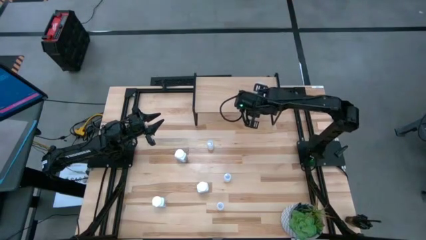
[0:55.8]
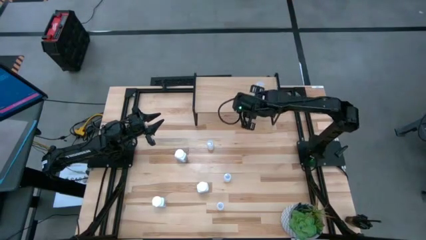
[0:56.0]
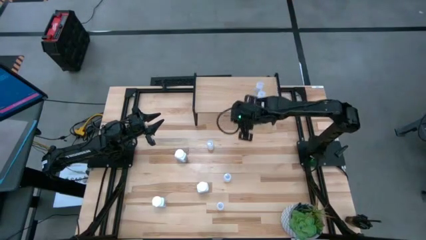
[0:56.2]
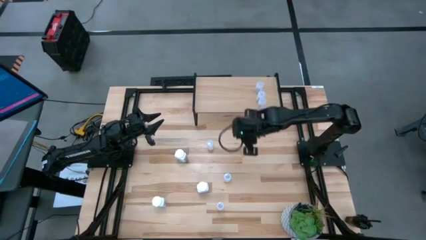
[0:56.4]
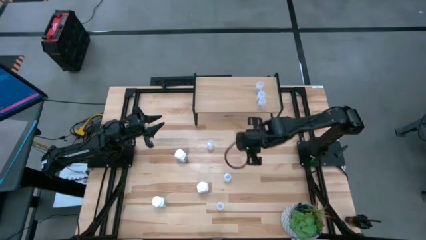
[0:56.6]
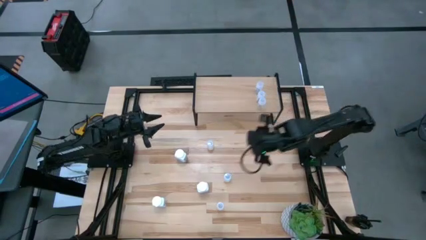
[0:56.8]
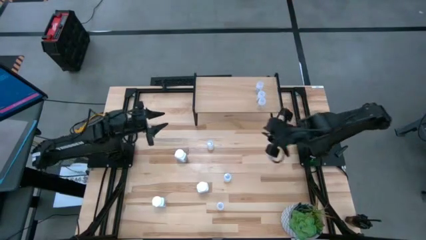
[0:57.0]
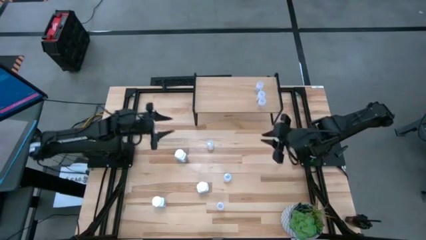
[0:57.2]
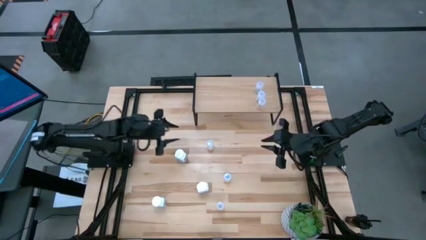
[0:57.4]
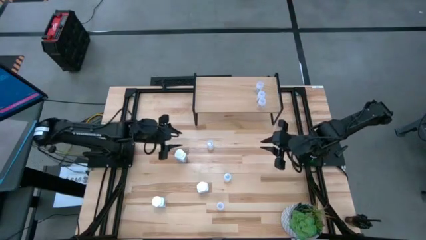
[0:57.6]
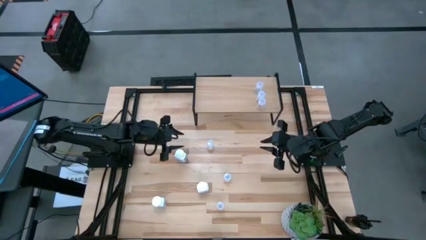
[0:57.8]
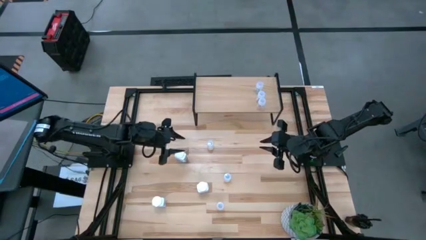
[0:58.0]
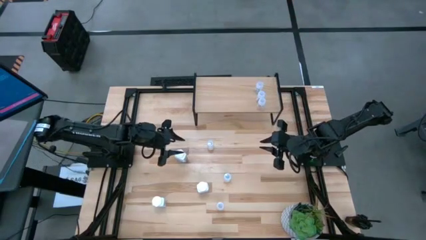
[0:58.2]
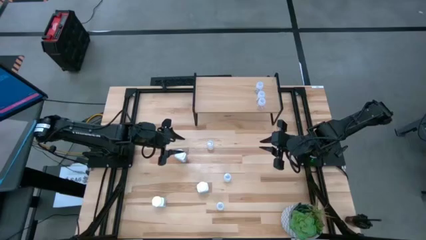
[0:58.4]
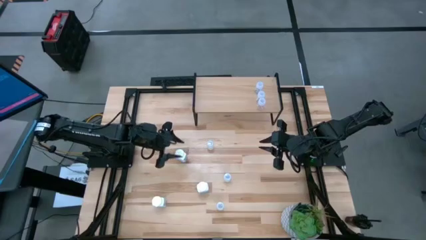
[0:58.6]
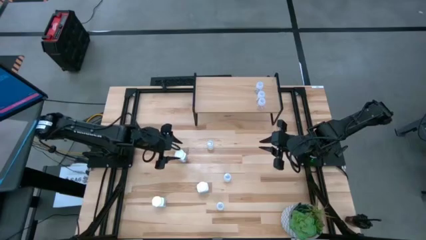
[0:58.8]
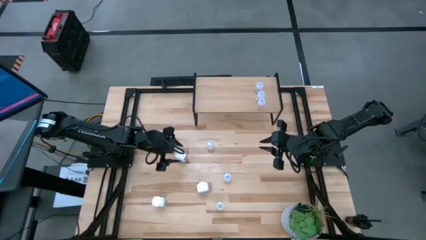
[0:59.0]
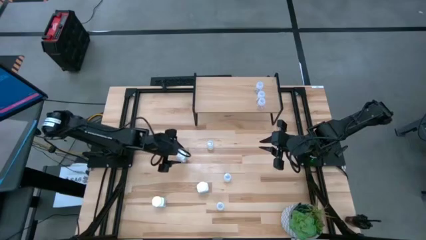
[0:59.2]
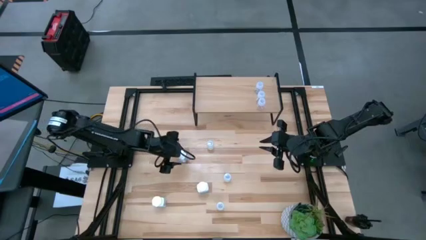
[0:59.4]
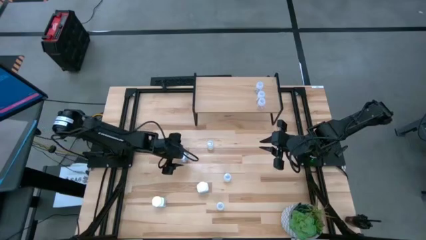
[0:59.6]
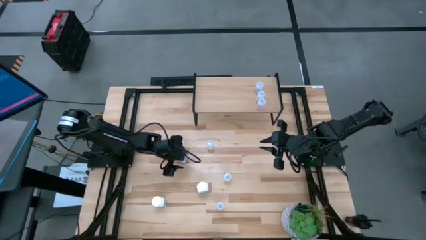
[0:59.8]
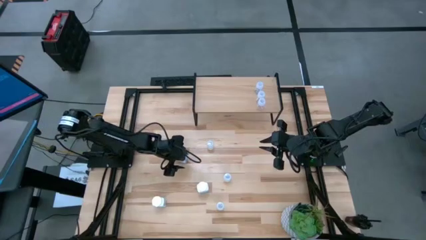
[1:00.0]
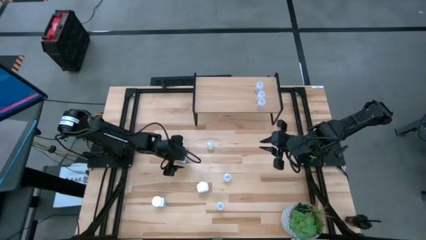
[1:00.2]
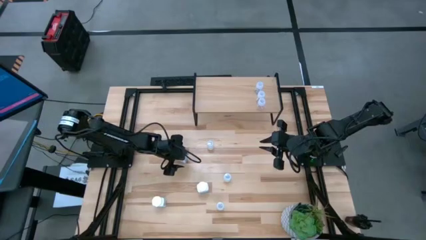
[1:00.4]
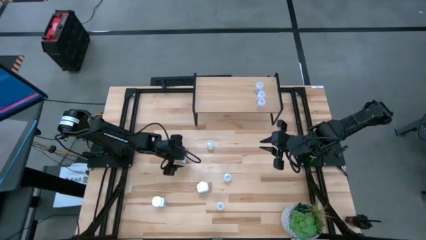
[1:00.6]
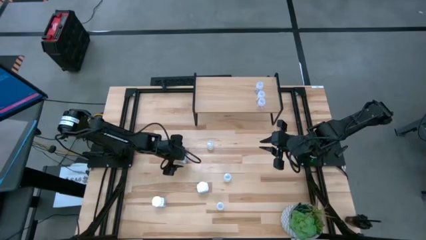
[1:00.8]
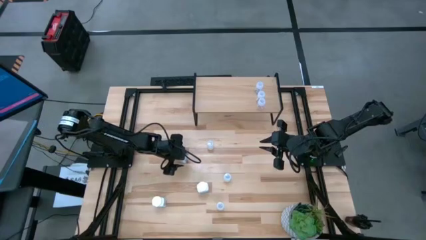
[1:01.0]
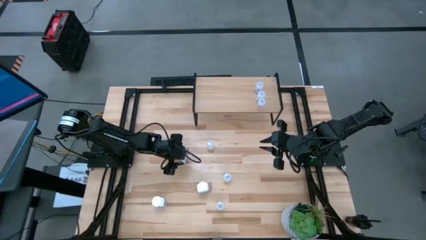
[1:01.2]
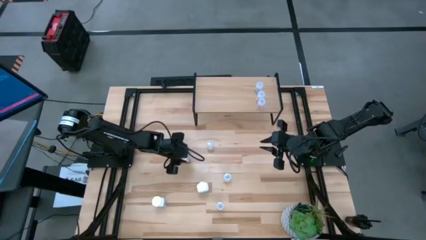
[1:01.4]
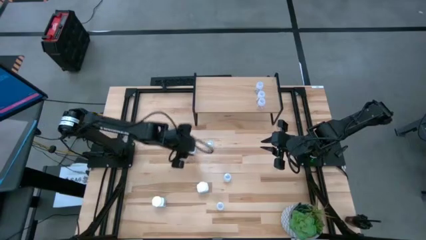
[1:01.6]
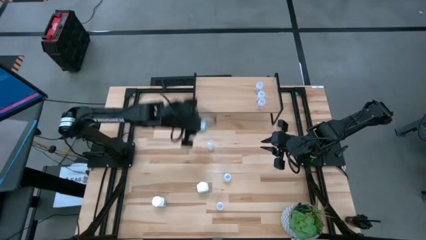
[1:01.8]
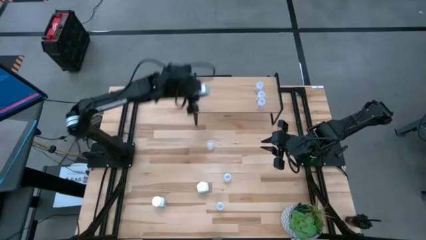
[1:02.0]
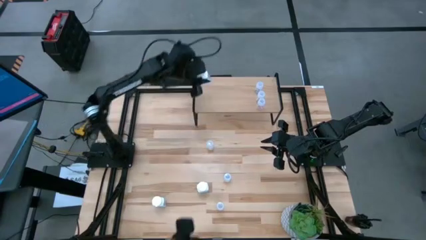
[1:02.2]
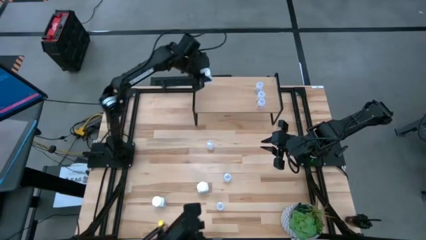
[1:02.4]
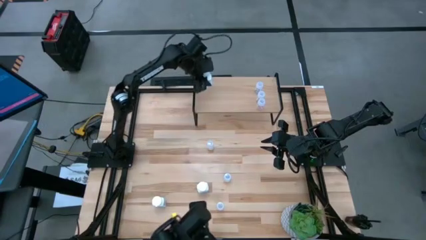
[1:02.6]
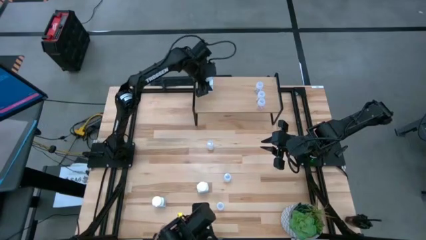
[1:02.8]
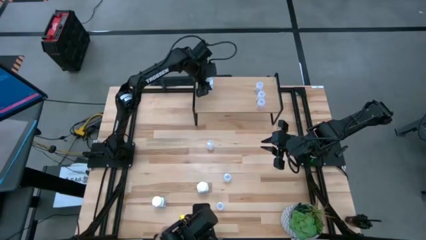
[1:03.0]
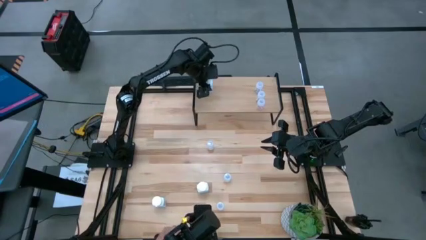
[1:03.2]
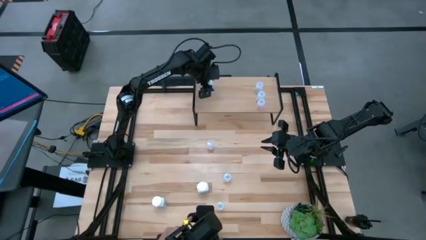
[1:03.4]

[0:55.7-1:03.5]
Task: Pick and place medicine bottles onto shelf by color
Put the top white blue pill bottle on the shelf

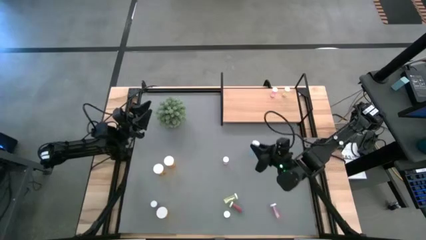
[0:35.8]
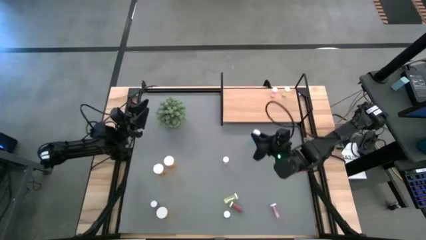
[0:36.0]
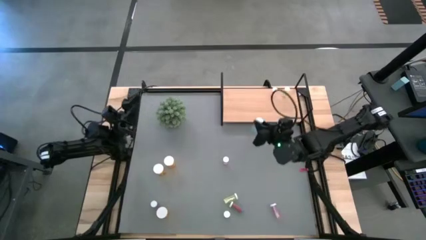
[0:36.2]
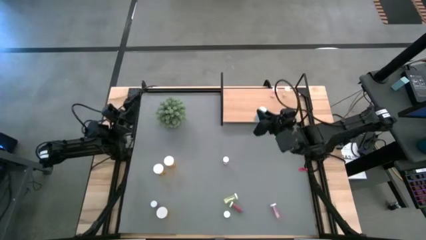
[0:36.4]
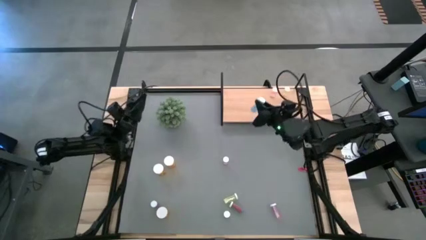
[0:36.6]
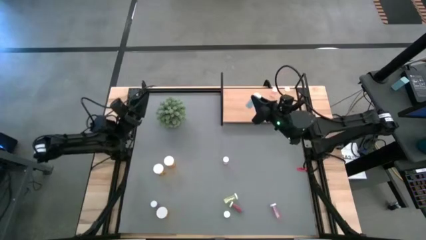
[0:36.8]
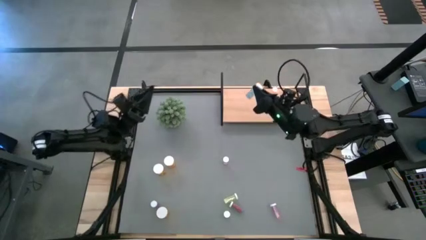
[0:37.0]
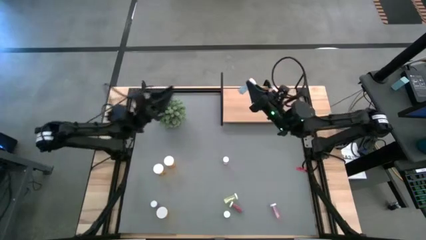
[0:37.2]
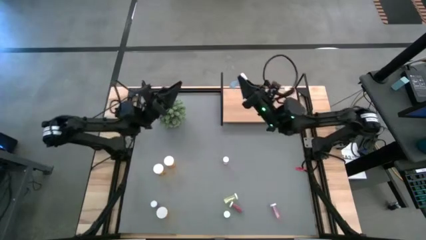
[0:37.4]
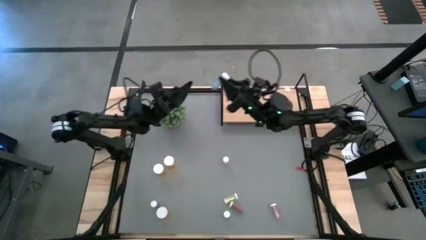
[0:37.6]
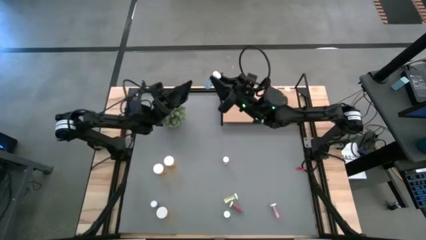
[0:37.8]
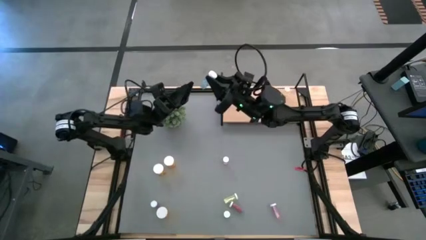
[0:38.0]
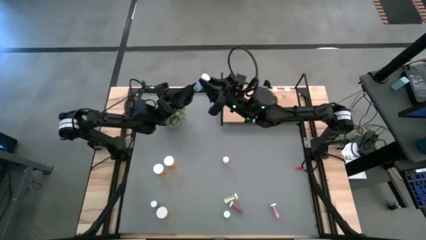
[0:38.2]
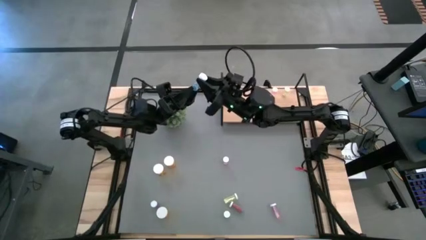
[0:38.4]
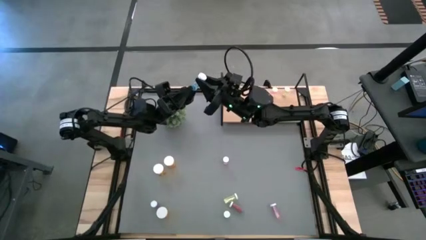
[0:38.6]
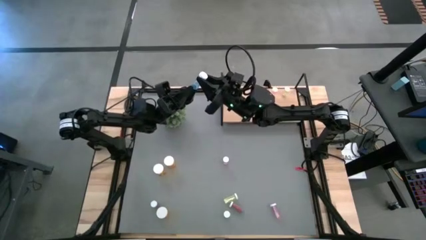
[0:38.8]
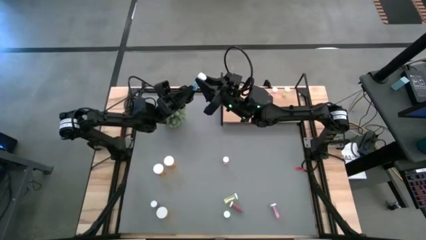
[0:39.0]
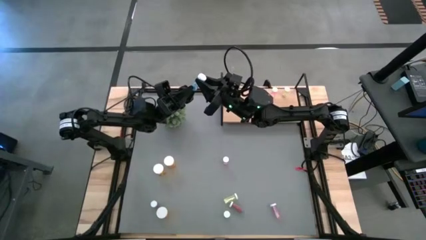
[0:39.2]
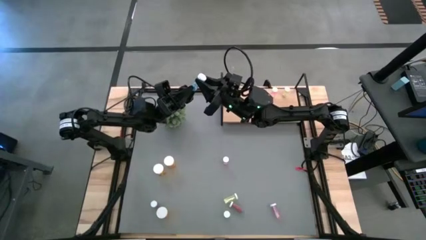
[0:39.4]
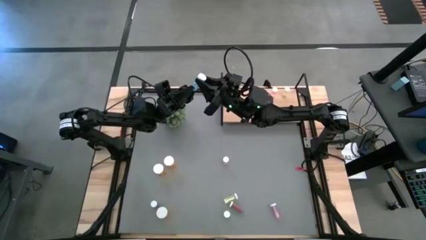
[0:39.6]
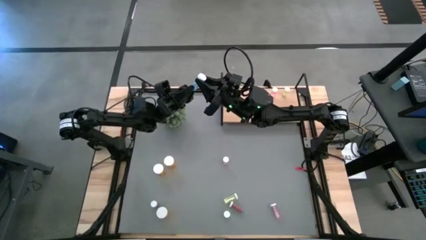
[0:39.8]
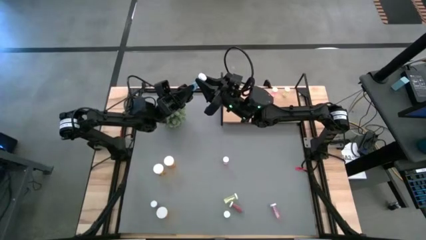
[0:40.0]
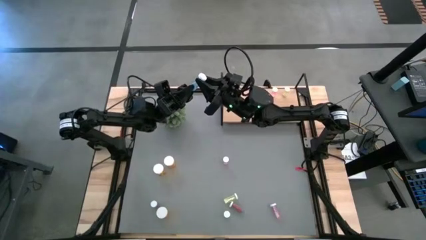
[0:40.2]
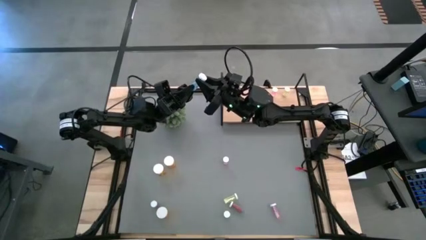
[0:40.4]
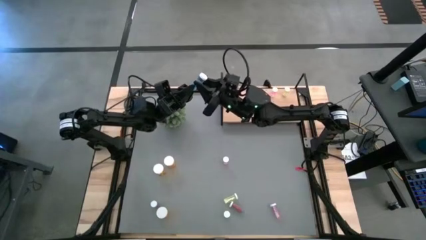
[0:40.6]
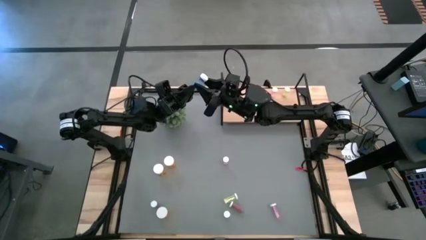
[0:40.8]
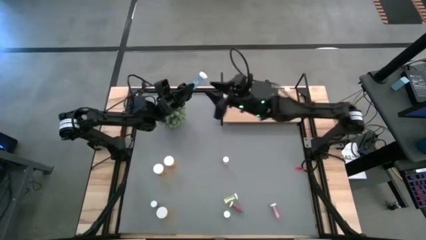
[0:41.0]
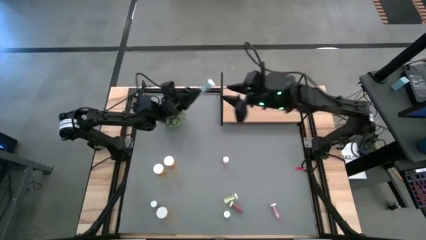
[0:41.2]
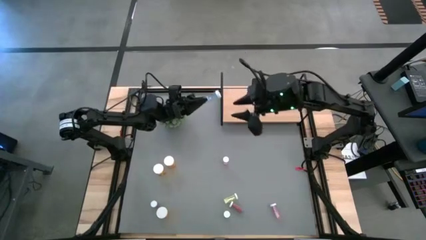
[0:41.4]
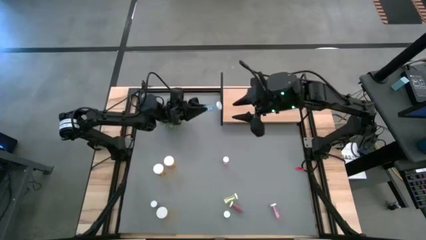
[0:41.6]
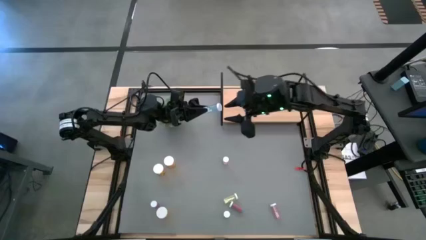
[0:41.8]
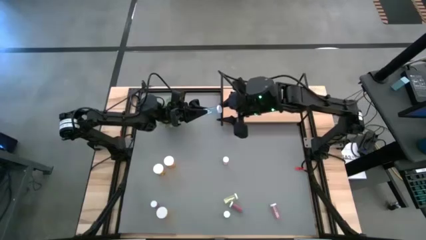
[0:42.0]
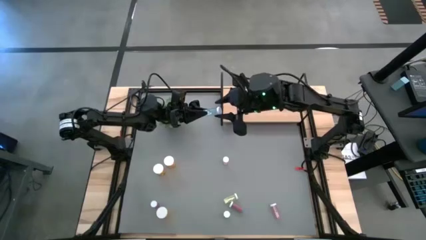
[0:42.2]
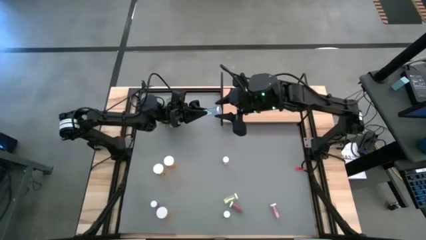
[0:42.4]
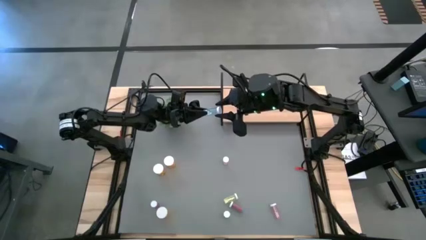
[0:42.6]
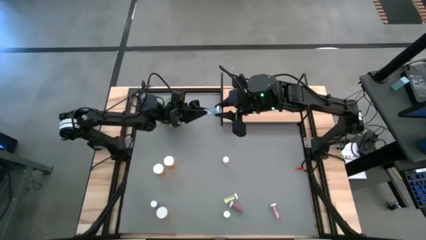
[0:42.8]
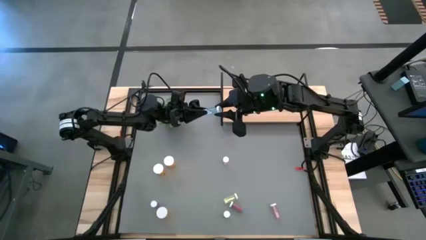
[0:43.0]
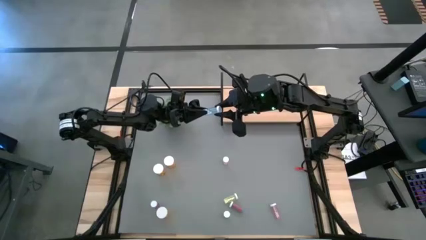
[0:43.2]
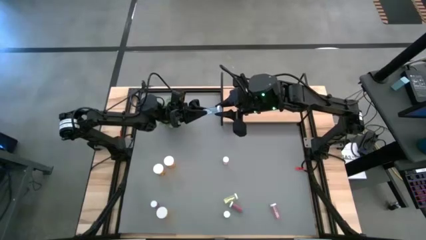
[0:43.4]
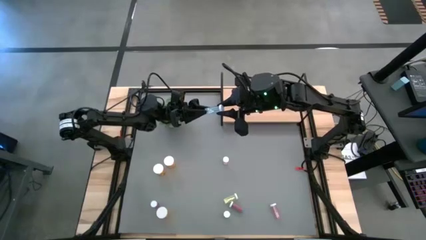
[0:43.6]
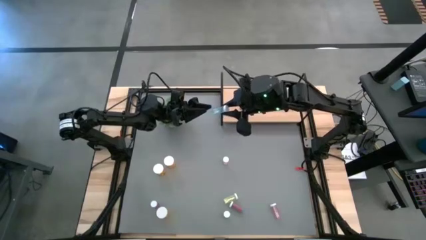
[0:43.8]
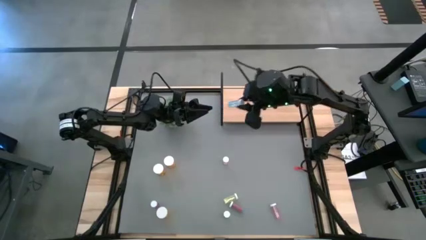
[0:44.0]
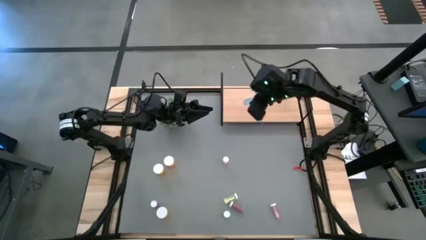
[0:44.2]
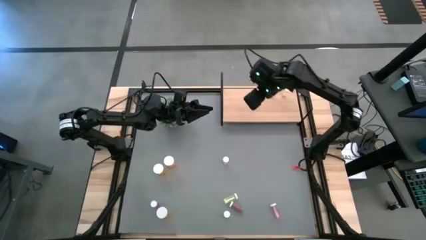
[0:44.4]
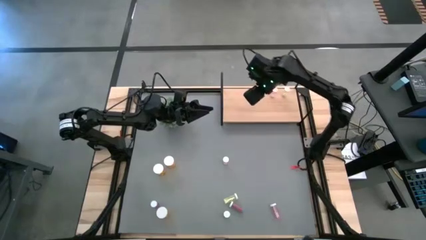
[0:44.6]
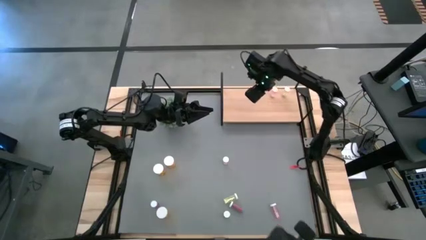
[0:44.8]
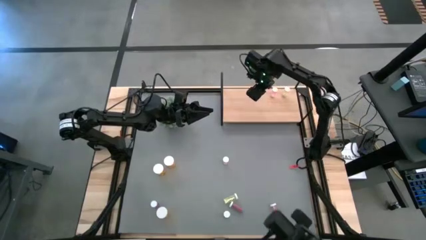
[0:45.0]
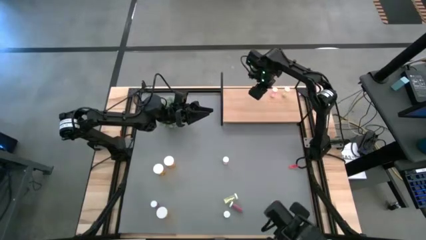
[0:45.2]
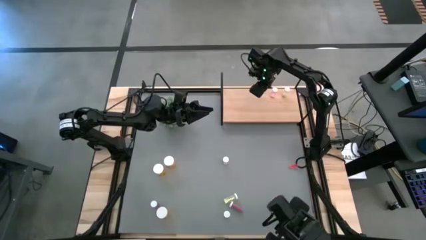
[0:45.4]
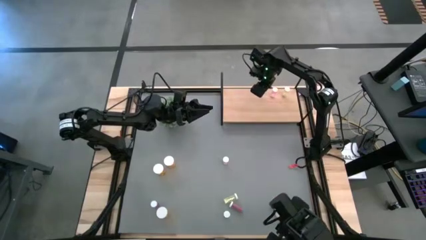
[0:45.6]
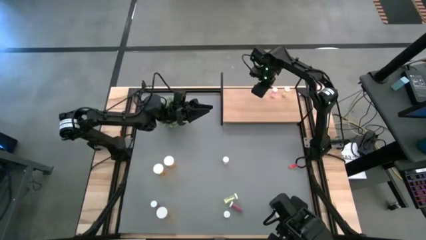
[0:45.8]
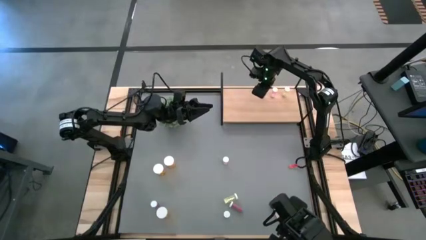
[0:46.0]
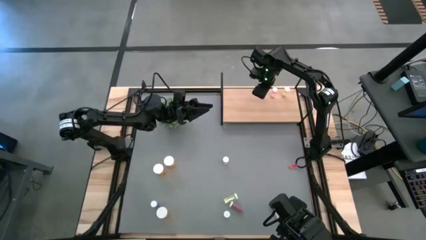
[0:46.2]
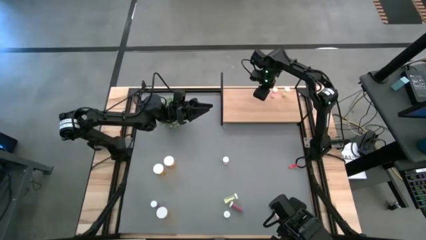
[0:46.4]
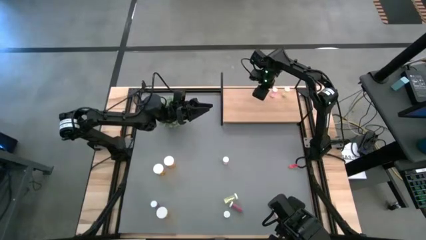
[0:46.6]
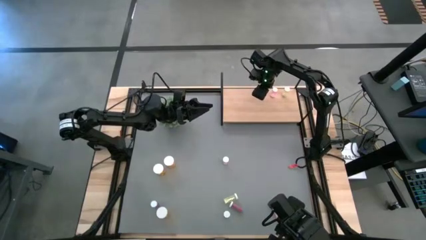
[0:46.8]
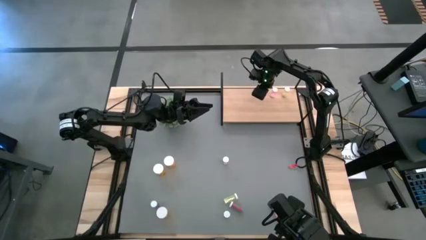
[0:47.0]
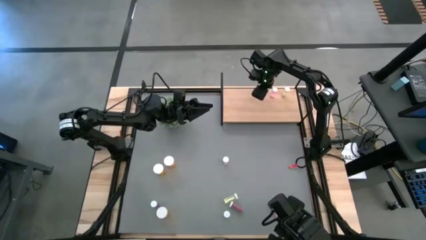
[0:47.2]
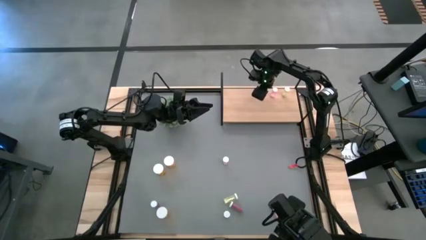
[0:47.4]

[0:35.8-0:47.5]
Task: Pick and place medicine bottles onto shelf by color
Put the bottom right blue pill bottle on the shelf
